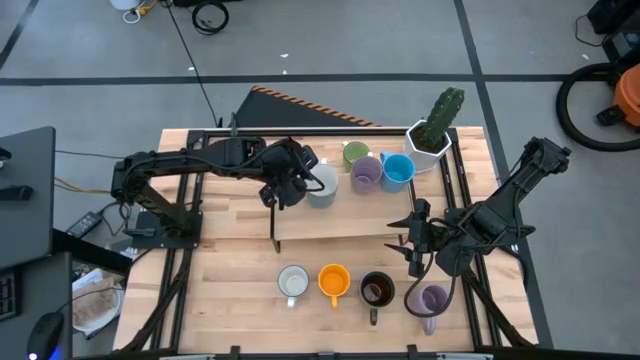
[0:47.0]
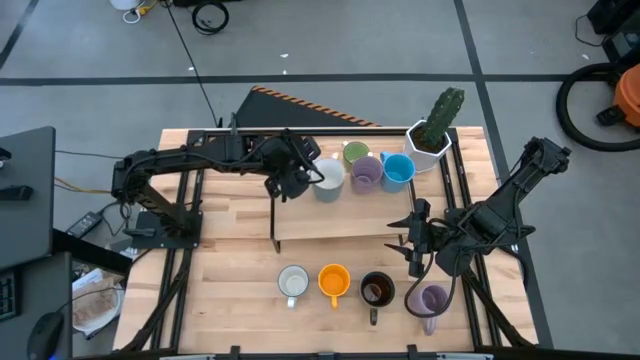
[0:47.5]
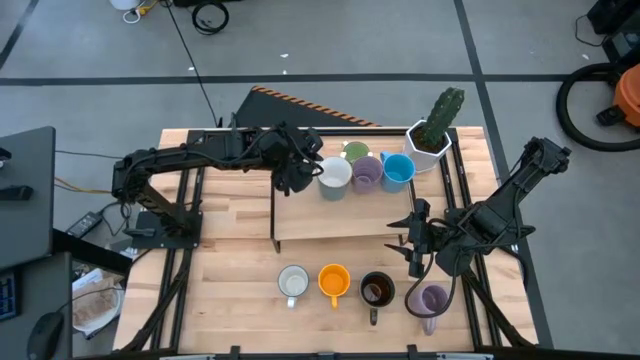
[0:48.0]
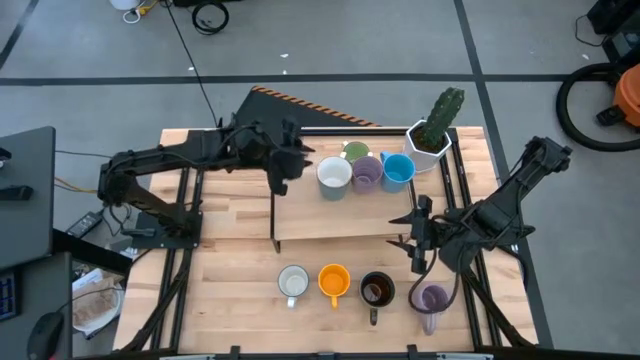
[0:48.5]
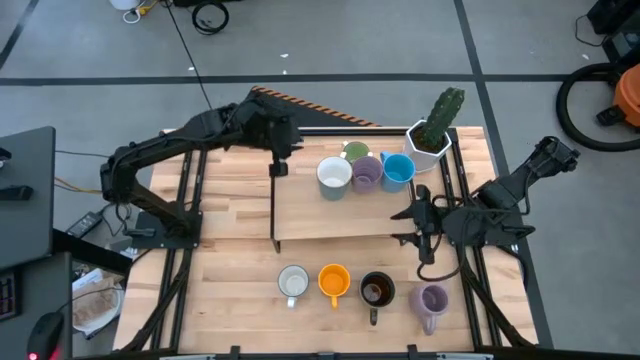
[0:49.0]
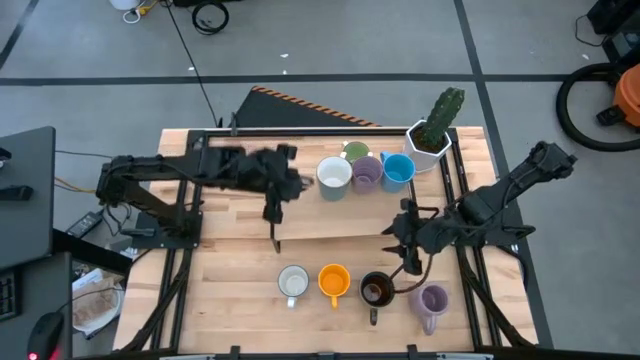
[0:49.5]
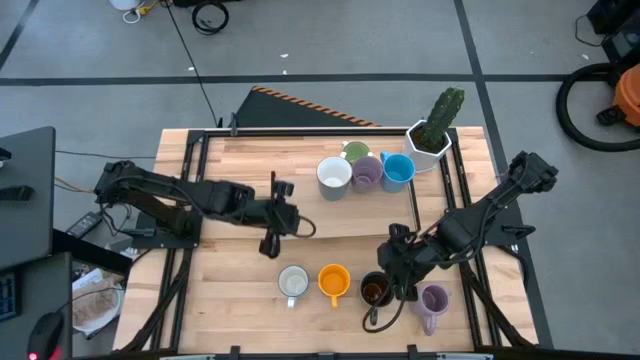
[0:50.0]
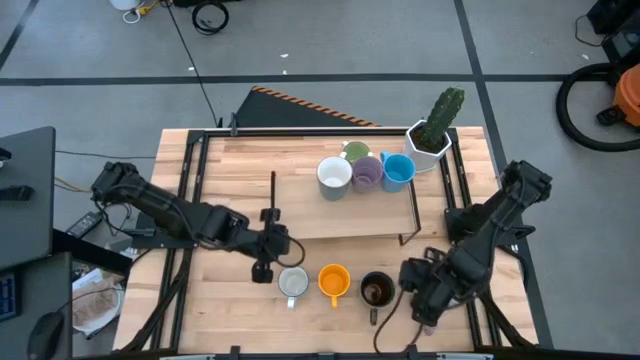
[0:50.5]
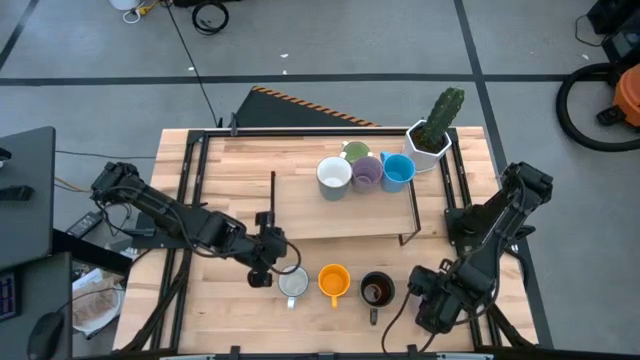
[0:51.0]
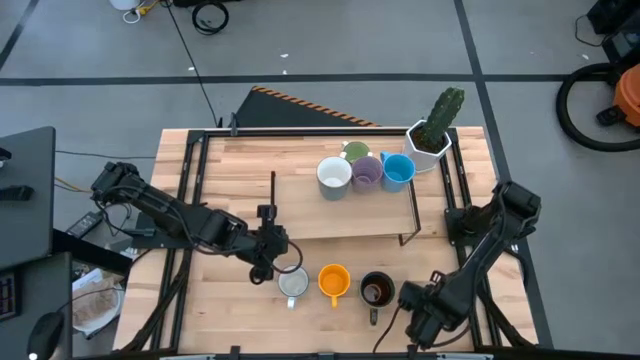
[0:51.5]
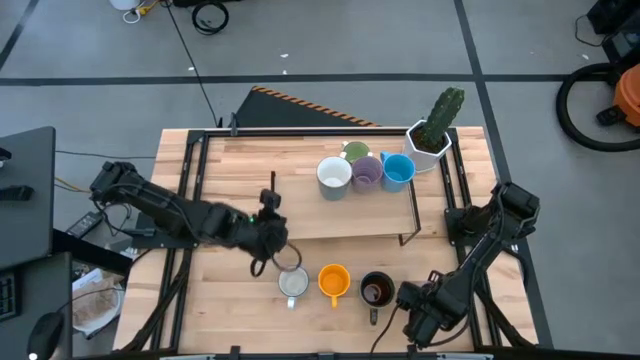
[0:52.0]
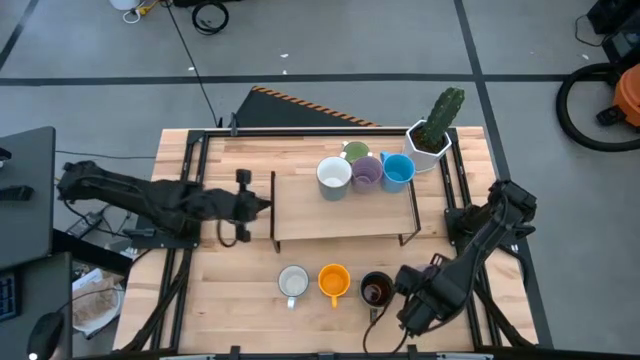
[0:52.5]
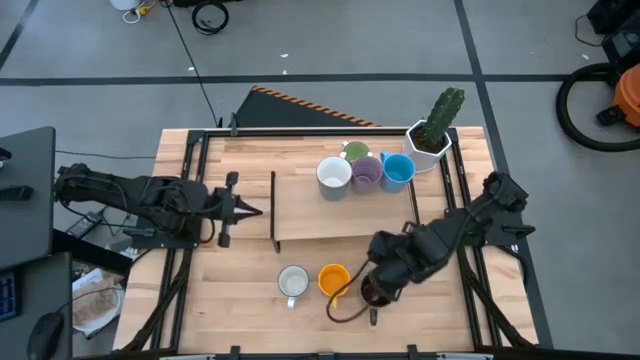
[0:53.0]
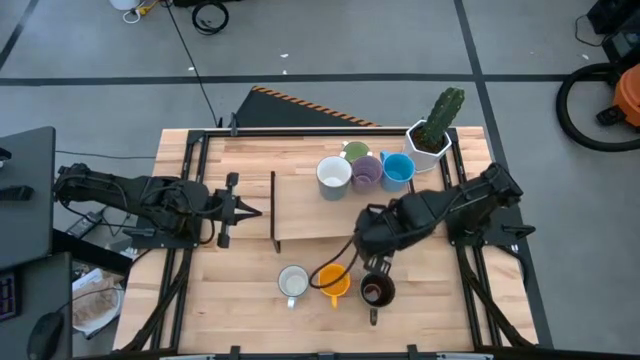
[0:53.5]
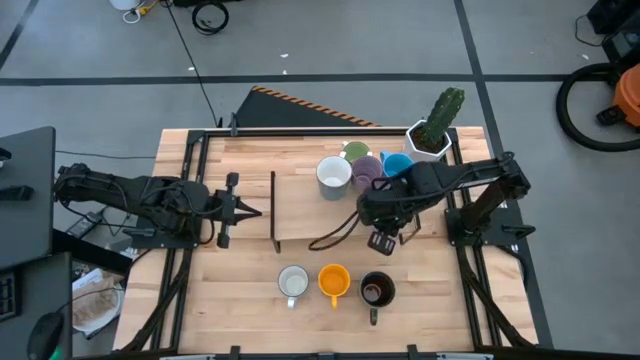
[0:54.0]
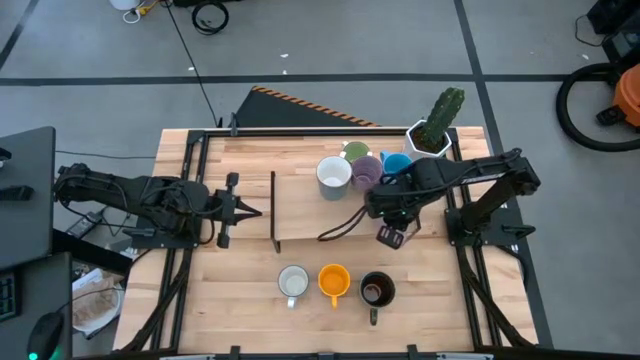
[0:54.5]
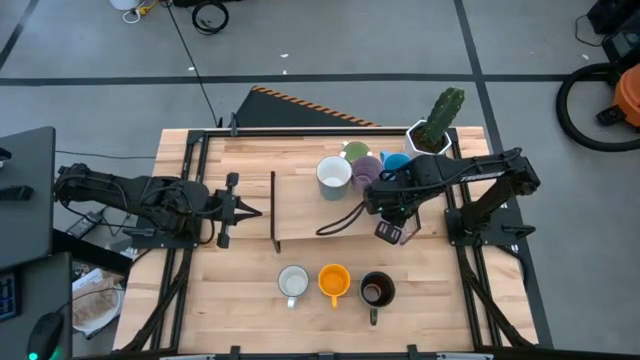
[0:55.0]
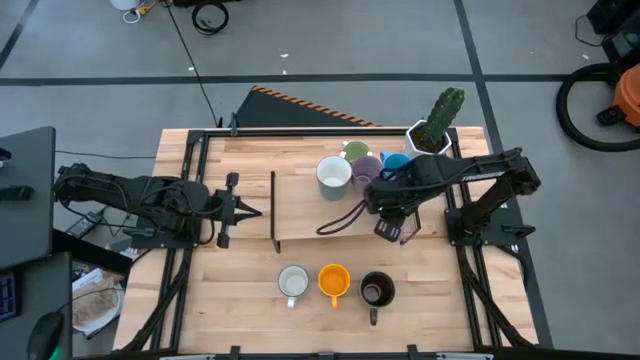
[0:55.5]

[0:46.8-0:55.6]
Task: Place coffee mugs
Put the light purple mug on the shelf

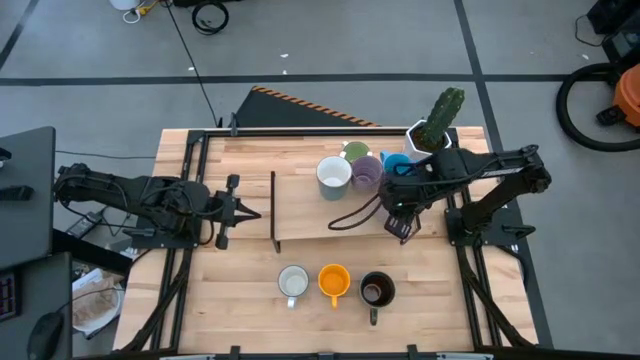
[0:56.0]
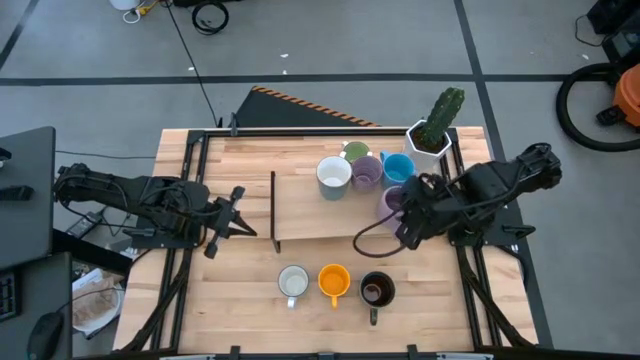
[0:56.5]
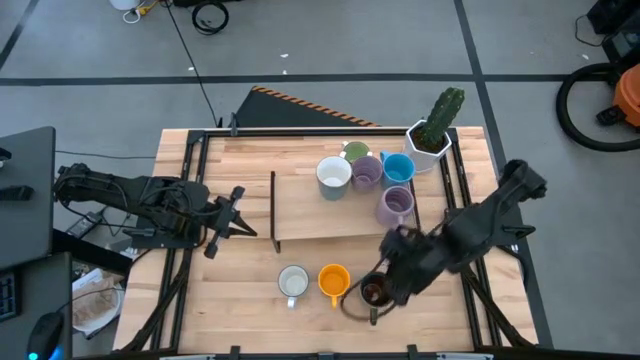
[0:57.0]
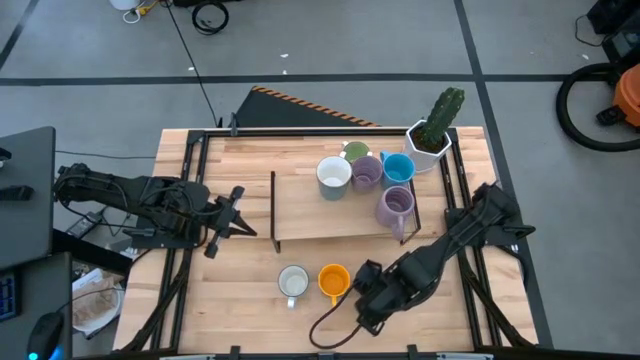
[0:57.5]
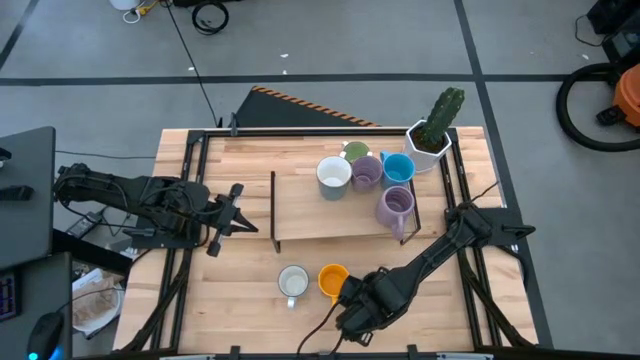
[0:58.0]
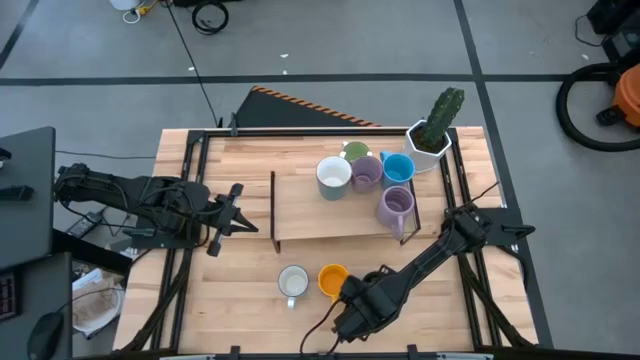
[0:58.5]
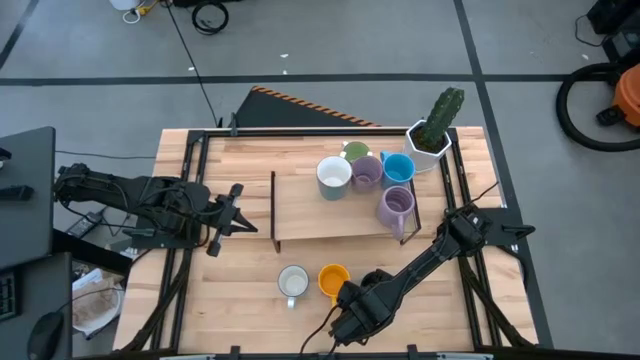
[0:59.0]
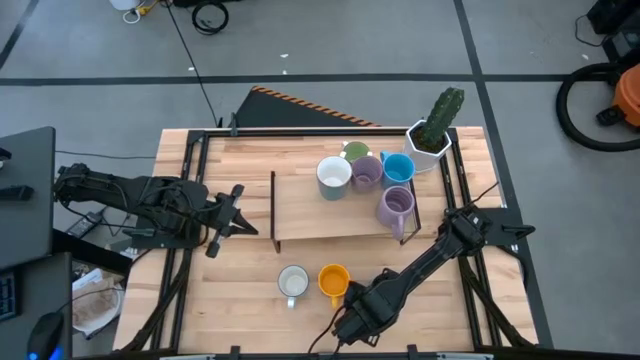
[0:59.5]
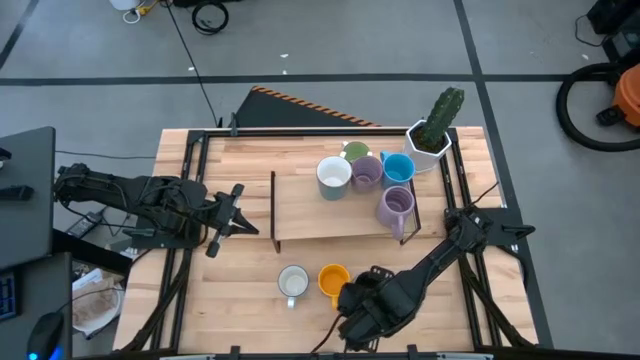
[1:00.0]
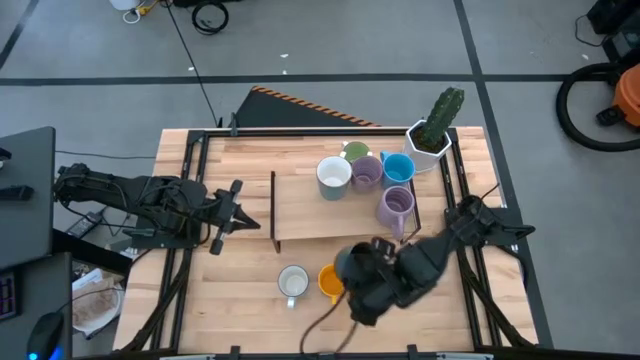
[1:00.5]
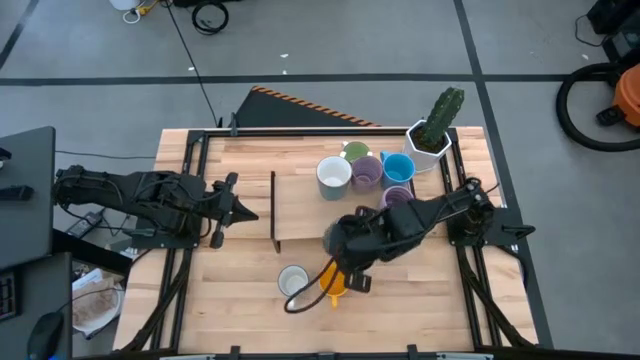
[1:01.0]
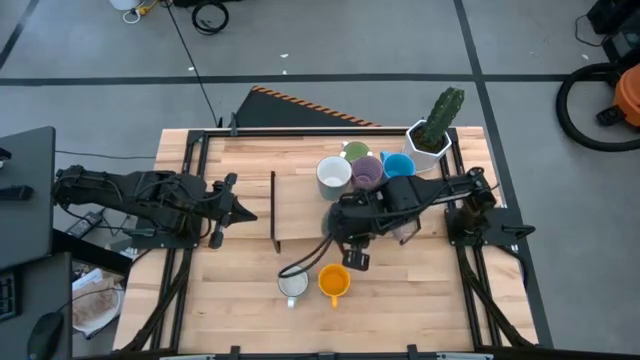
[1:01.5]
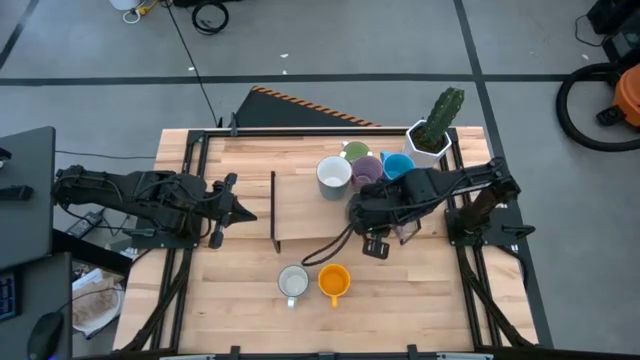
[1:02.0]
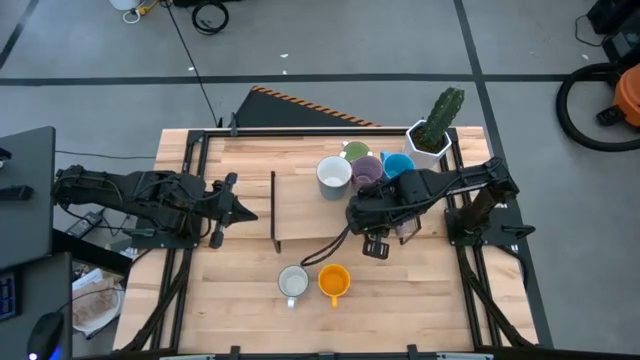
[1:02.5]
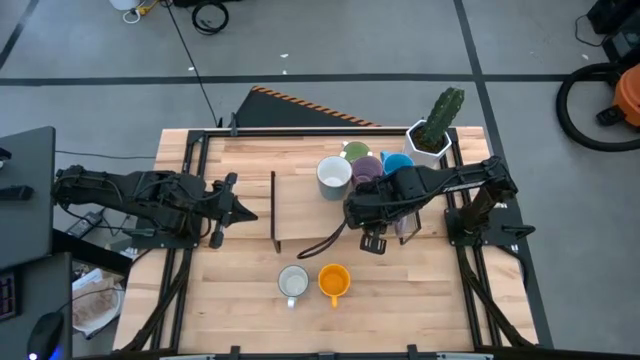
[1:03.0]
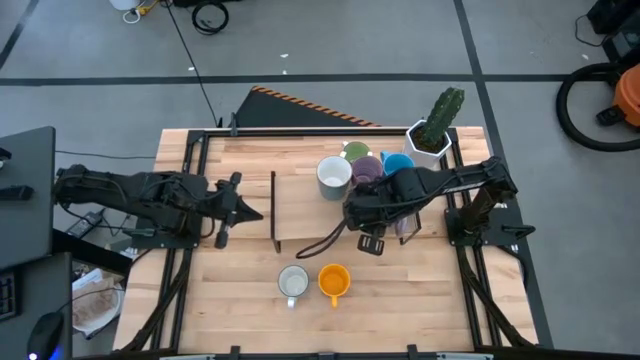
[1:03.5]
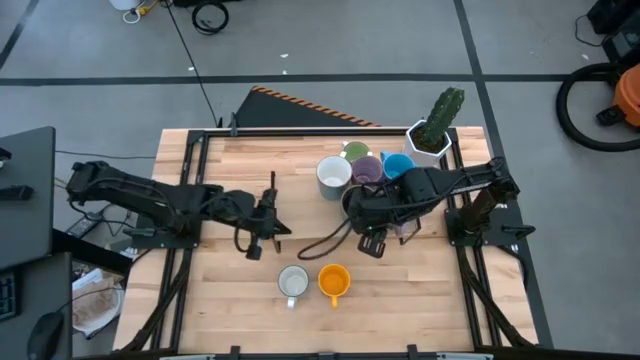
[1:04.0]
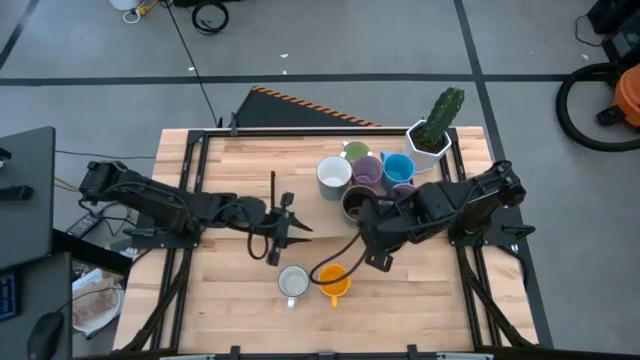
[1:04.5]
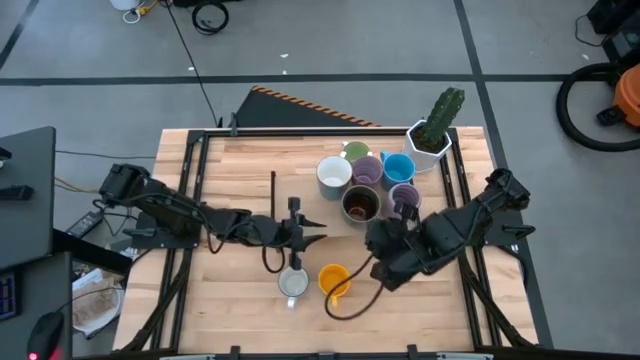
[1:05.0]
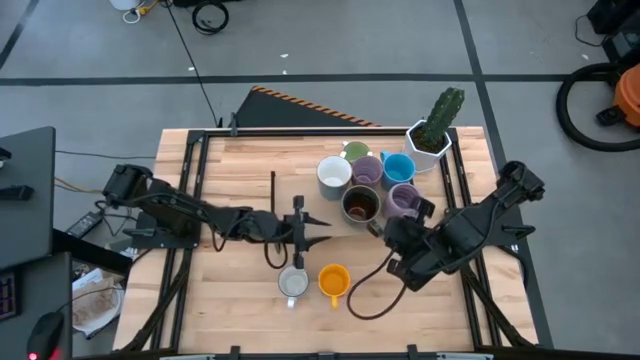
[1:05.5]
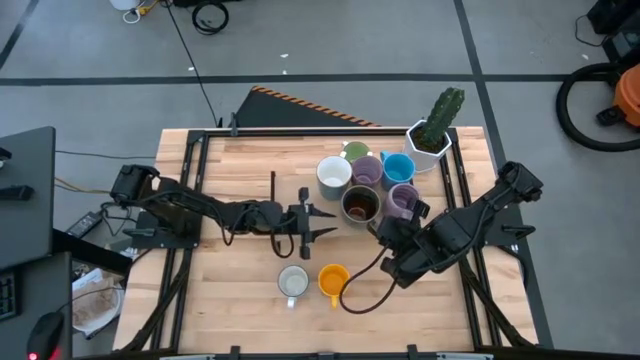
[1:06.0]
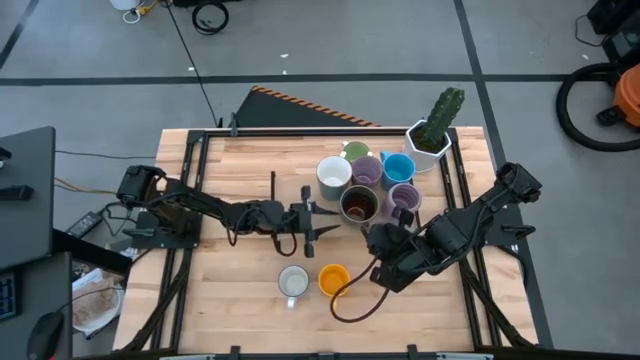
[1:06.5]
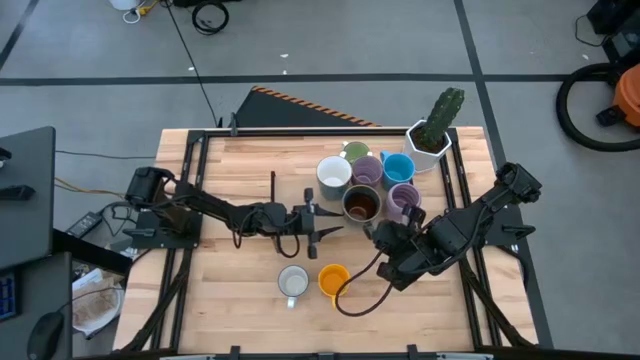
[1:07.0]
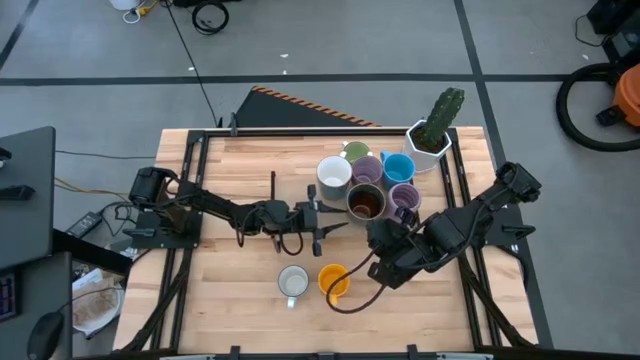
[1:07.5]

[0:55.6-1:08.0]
Put the dark blue mug on the shelf
